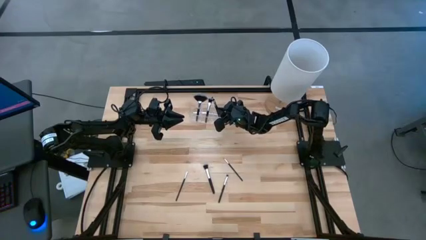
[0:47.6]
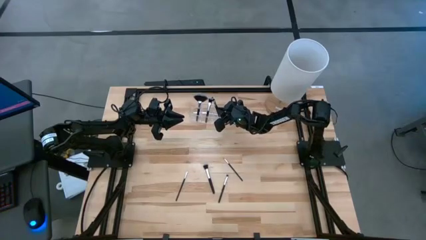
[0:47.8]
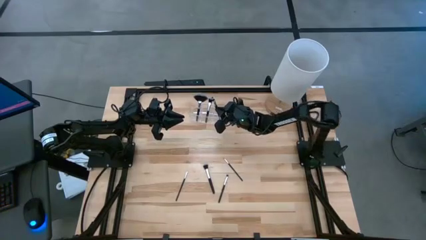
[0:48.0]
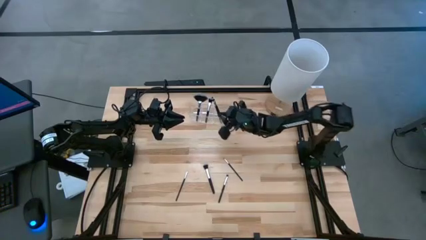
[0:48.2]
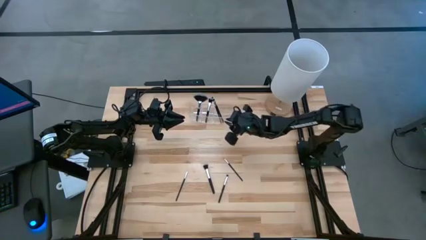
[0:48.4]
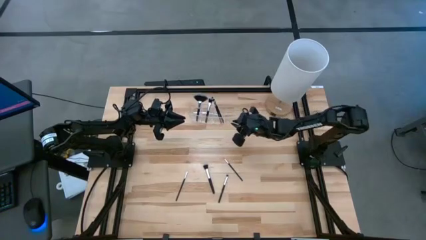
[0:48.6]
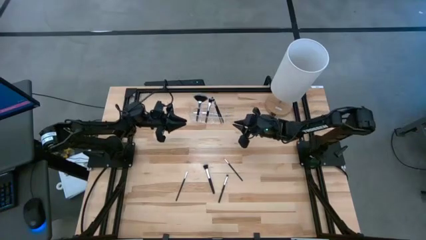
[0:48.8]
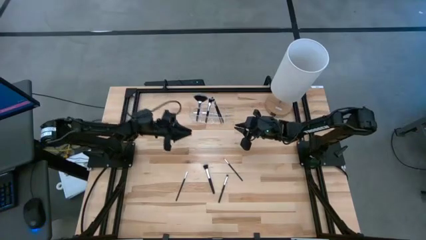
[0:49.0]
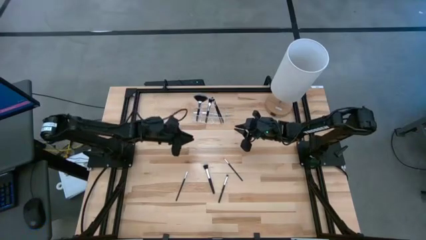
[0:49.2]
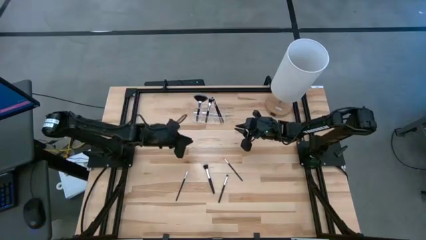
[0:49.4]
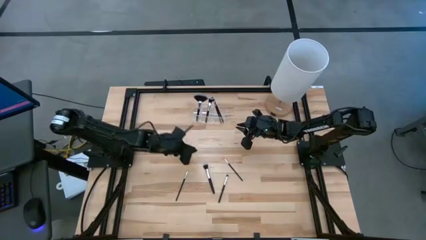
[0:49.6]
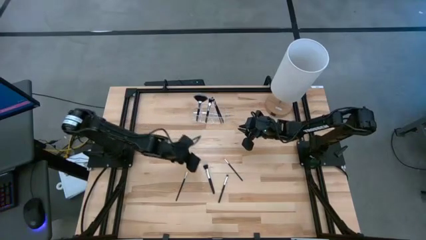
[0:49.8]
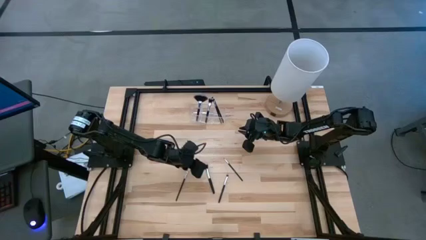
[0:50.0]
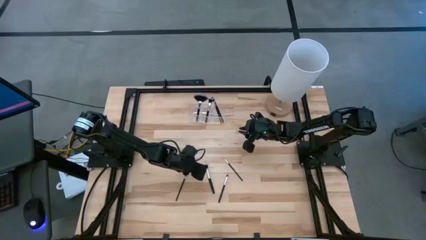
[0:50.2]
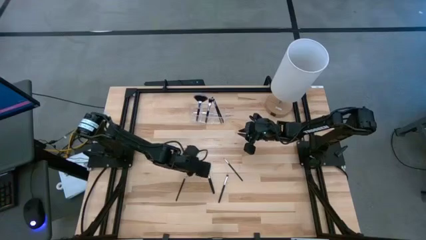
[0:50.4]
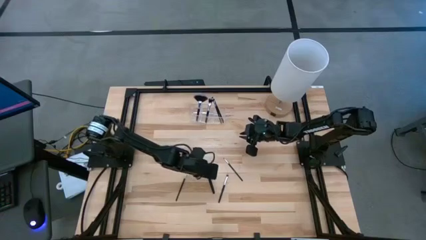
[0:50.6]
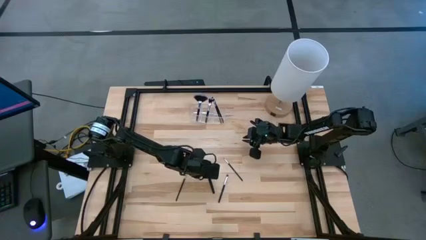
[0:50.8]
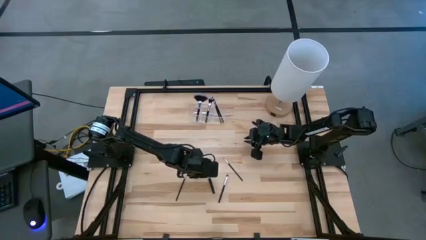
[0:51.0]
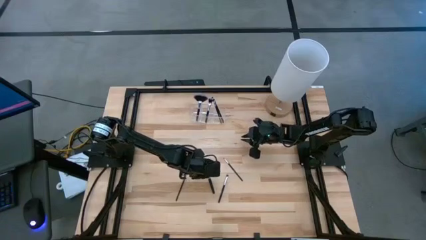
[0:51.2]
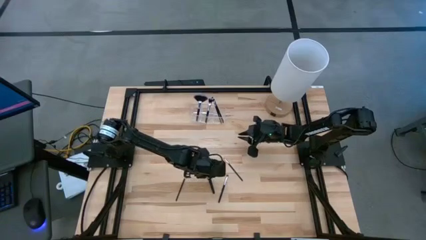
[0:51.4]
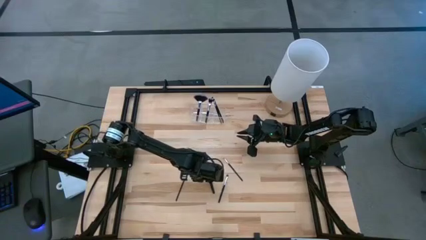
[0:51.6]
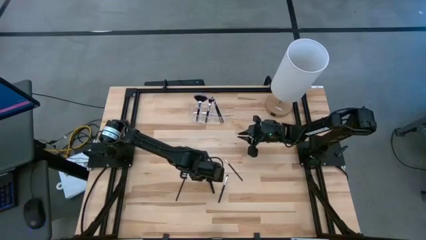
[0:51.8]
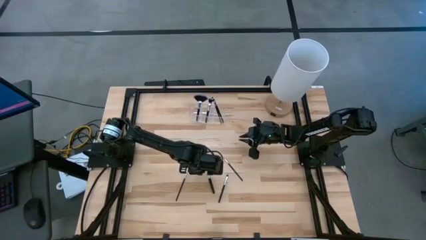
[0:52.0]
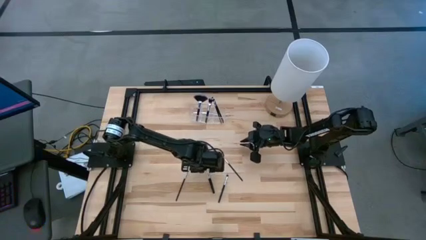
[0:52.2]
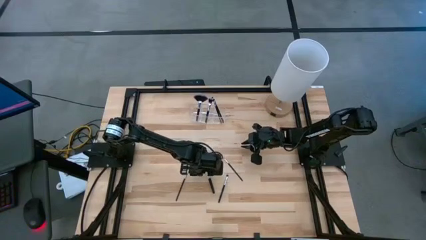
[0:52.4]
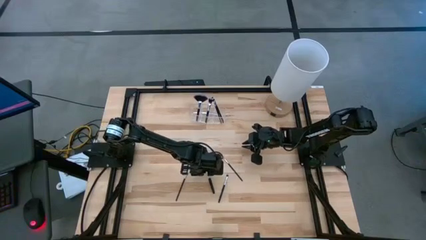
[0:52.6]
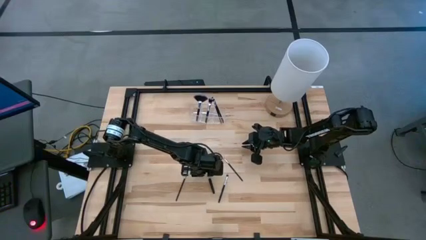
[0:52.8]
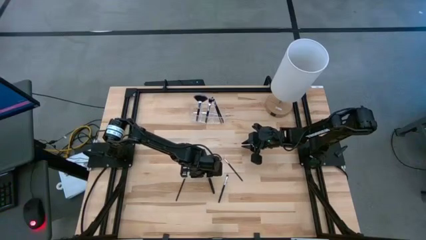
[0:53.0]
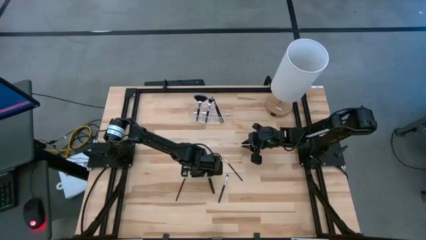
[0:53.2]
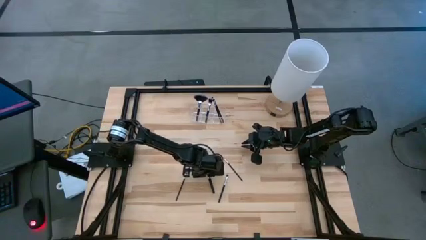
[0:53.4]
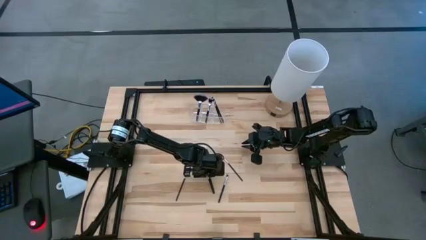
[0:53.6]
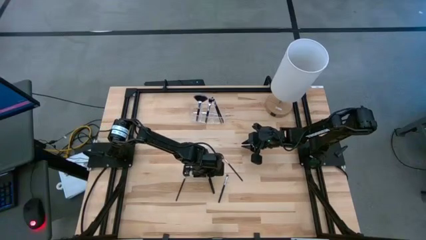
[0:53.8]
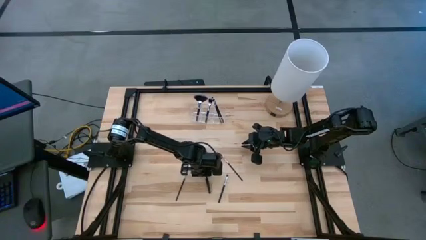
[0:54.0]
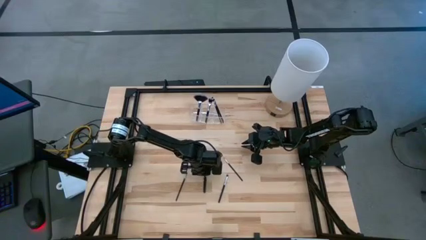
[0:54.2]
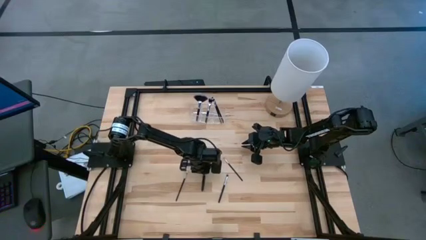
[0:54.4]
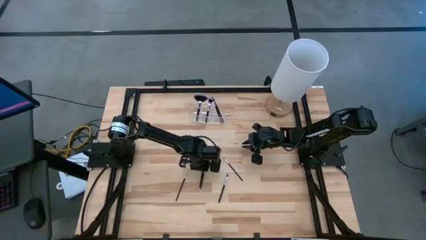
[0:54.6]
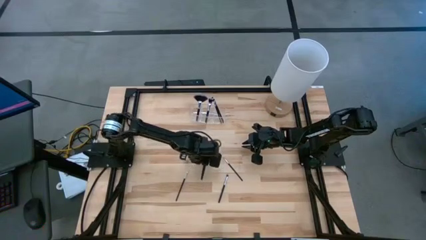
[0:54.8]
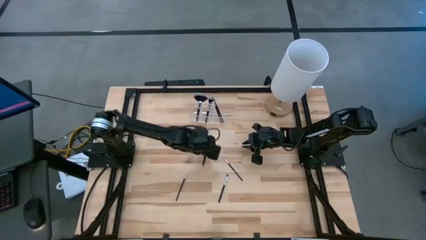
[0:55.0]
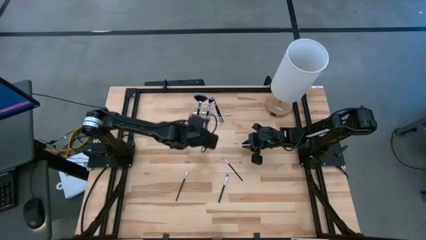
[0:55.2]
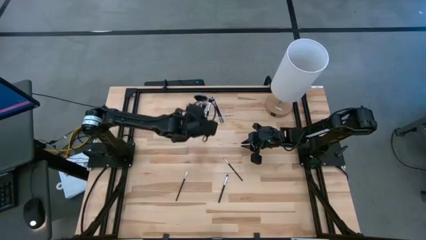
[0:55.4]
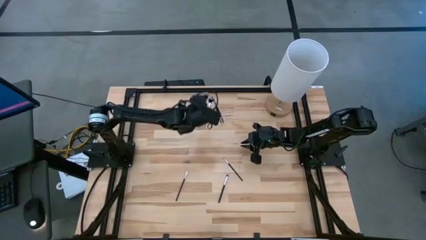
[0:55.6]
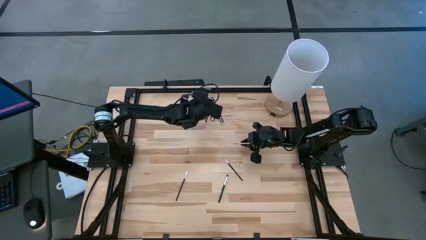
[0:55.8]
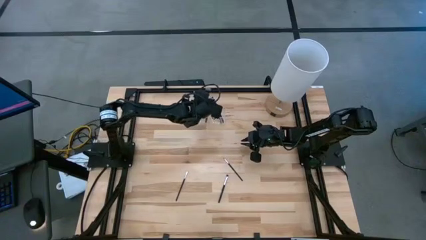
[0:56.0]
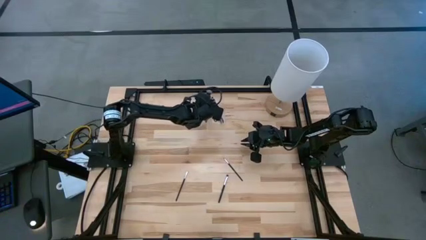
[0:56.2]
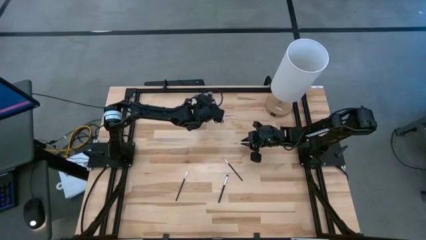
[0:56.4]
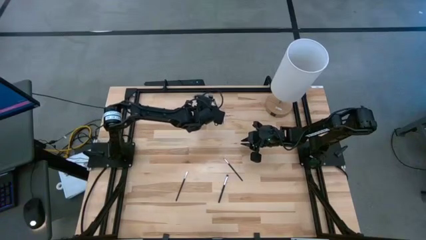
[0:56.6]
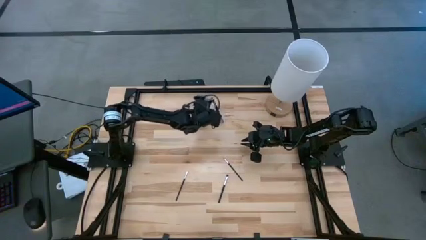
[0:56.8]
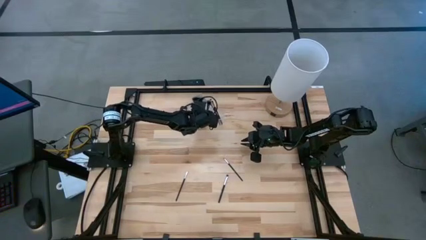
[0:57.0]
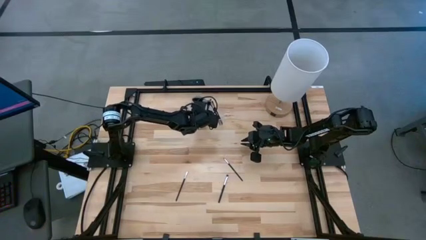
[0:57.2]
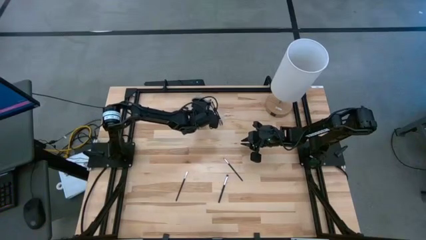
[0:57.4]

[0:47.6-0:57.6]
Task: Pick & Place Makeup Supplies
Put the makeup brush into the transparent organizer

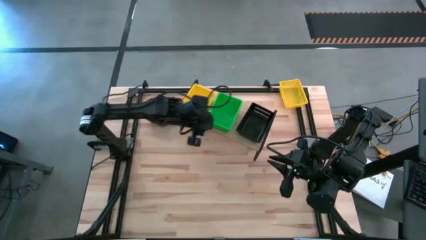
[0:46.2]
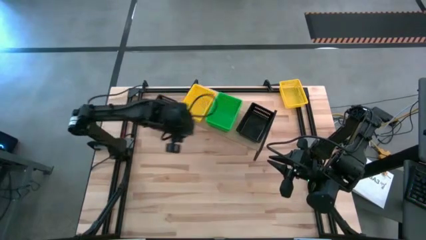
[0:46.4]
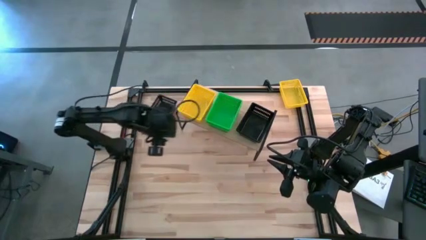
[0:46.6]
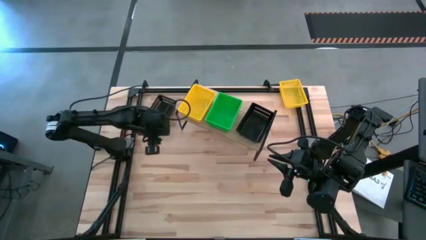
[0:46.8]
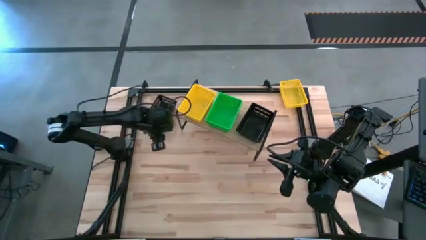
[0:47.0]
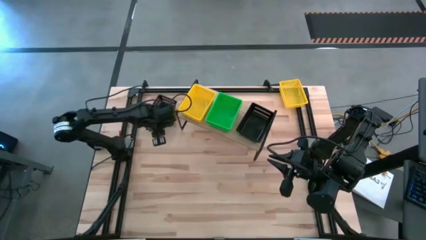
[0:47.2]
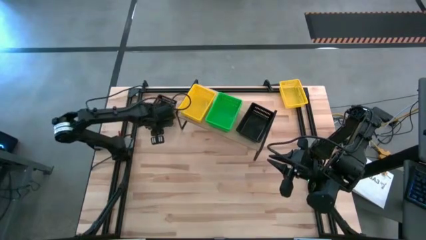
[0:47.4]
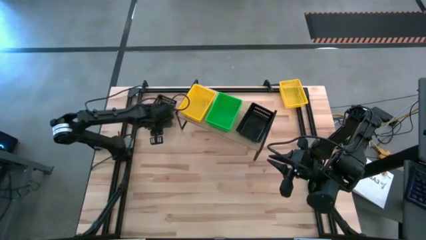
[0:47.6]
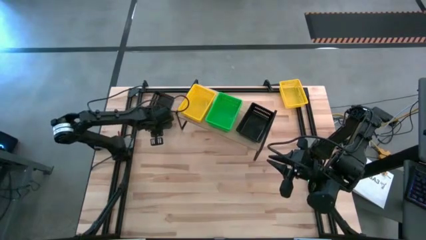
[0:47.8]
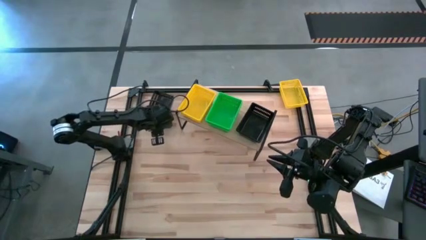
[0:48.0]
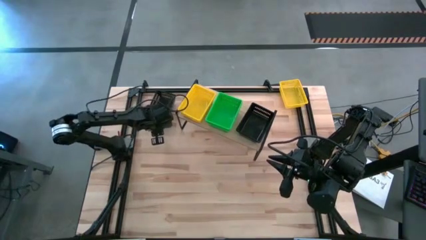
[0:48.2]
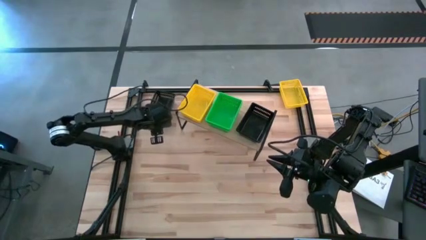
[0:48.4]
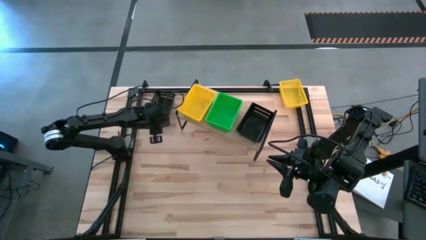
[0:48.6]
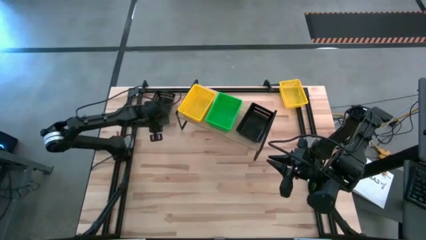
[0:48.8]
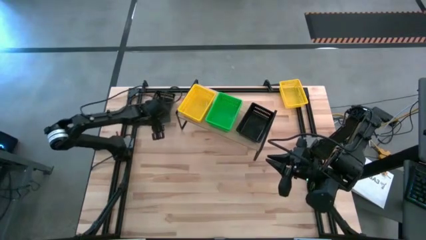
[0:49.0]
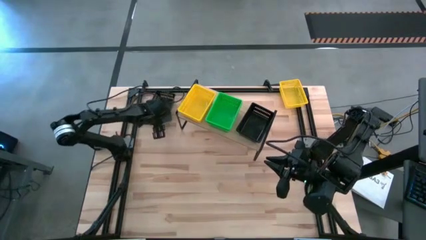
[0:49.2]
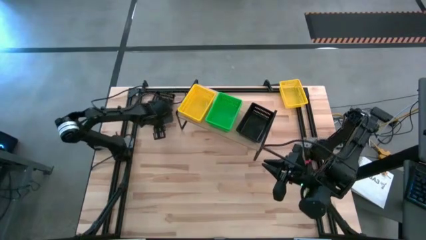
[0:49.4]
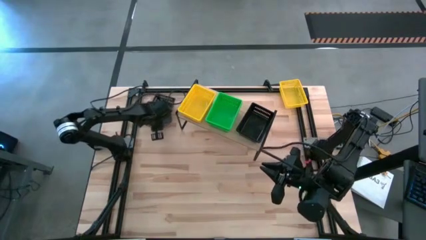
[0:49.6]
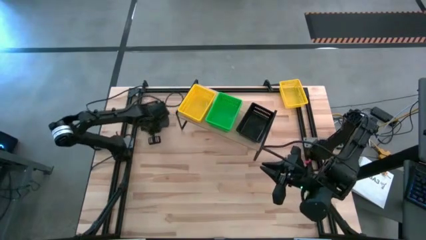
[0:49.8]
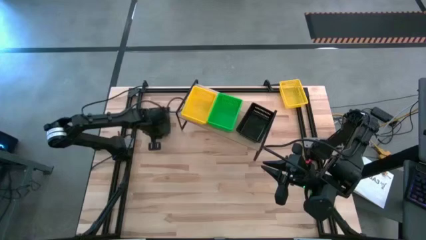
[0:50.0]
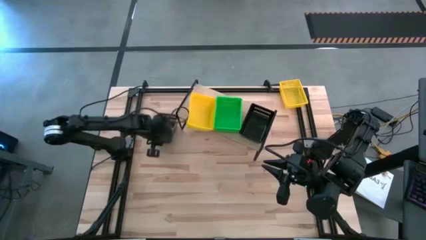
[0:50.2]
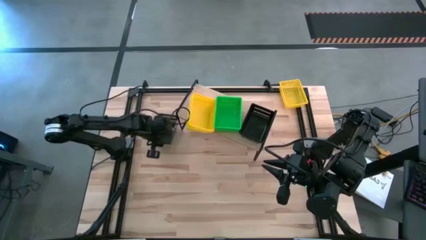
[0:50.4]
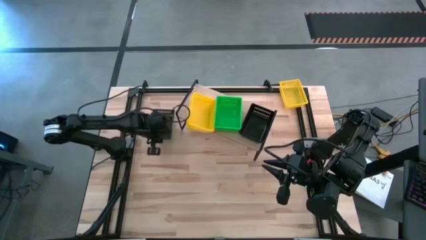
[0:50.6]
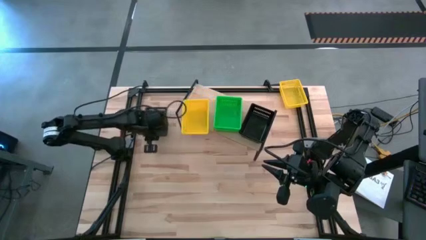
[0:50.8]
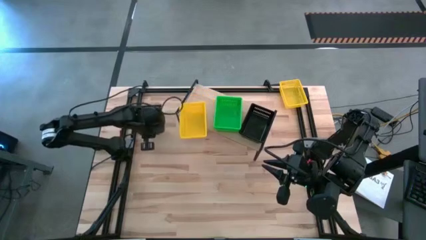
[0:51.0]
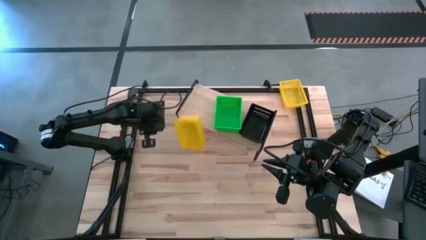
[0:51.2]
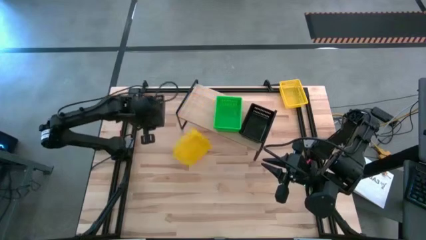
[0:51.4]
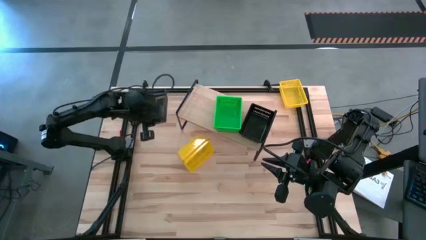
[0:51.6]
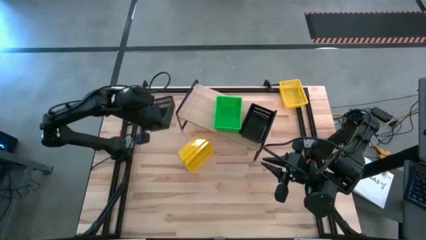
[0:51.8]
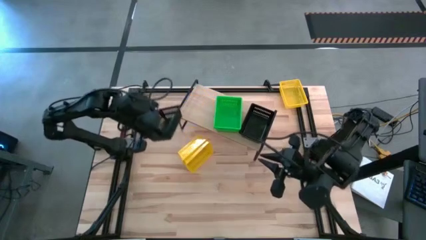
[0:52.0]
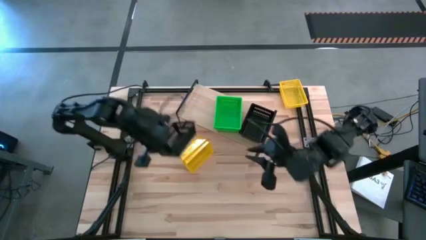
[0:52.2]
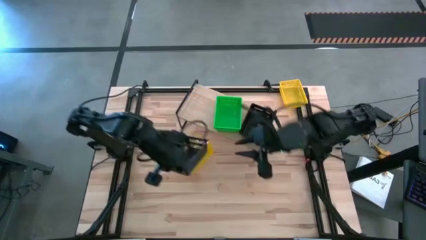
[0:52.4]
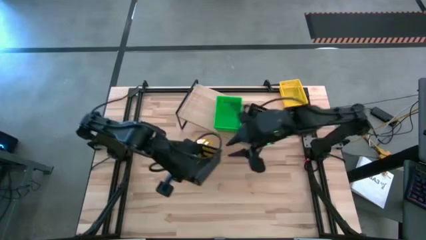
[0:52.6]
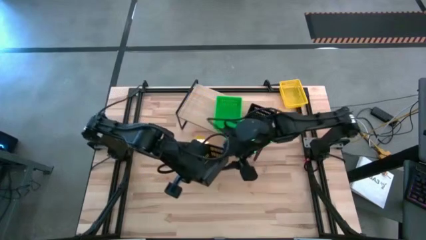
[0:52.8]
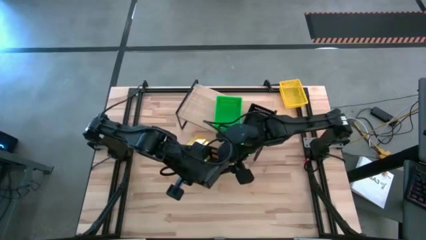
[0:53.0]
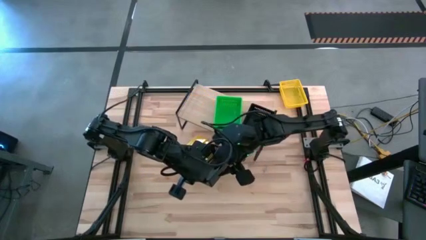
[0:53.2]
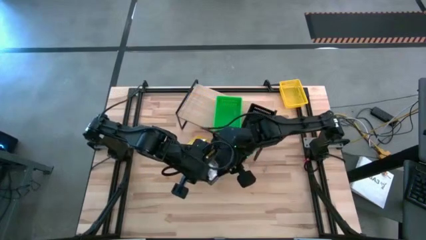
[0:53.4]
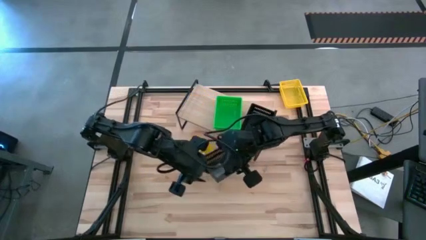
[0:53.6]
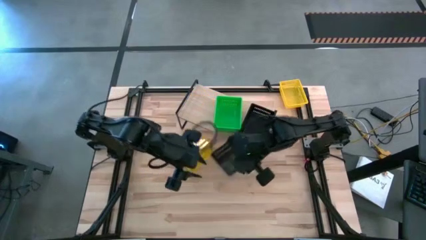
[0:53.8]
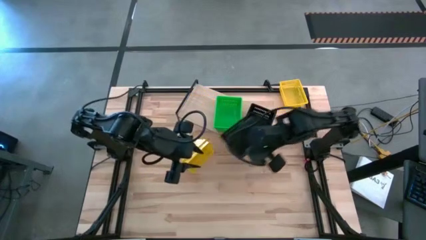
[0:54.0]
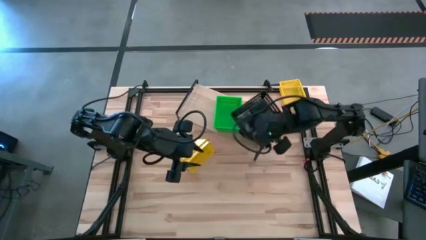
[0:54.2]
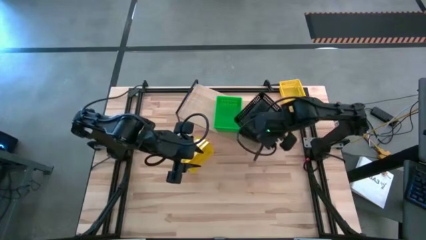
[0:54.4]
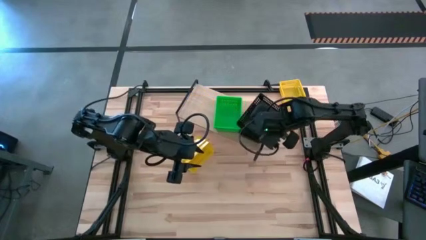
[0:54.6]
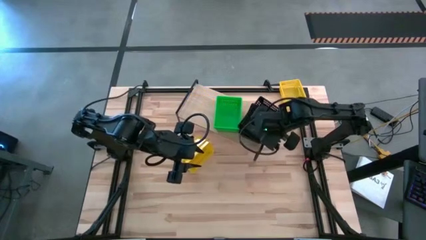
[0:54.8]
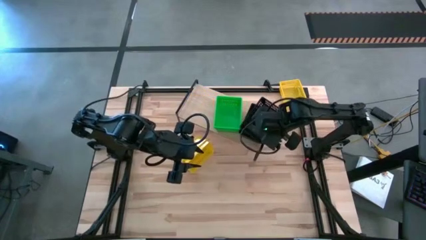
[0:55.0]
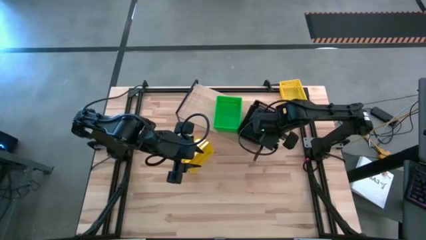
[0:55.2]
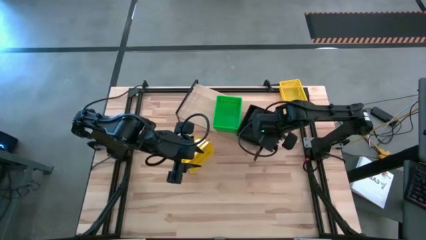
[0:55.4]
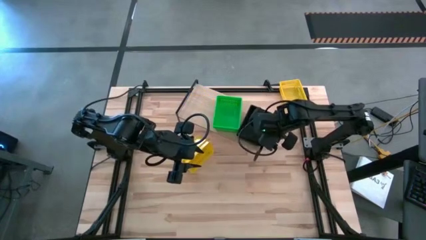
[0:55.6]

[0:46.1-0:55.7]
Task: Stack baskets on shelf by color
Stack the black bin on top of the black bin
